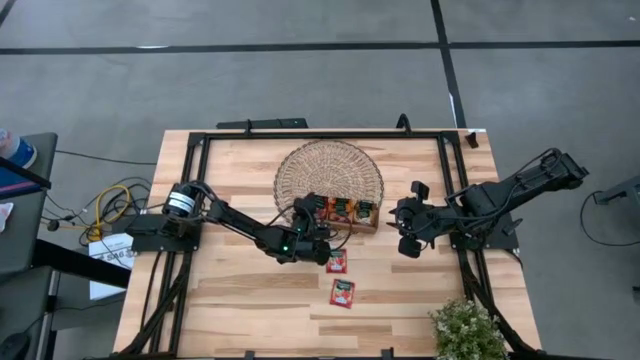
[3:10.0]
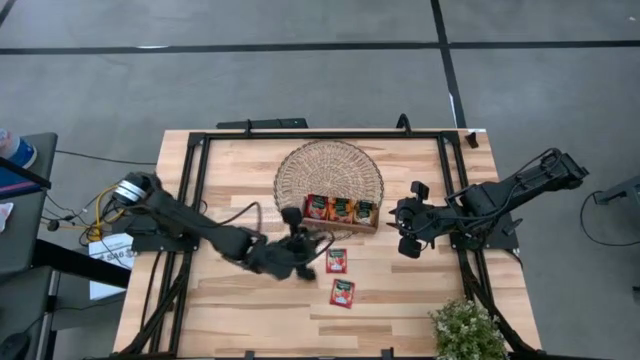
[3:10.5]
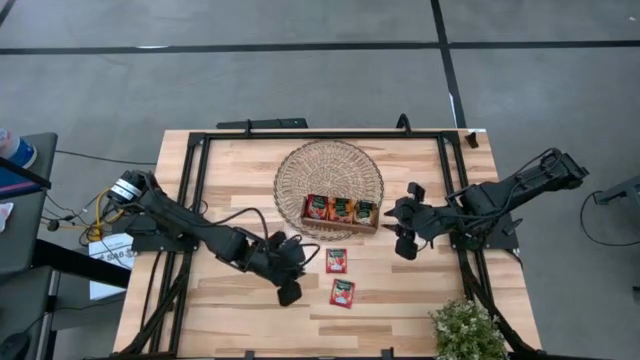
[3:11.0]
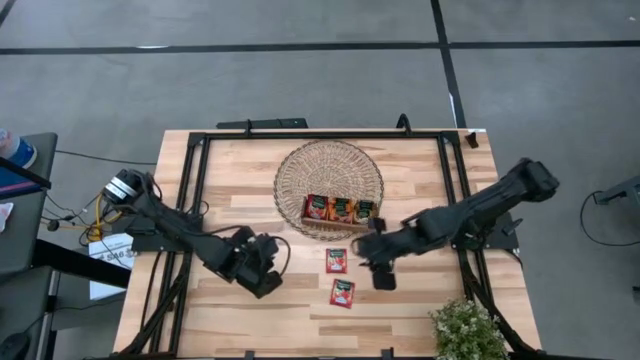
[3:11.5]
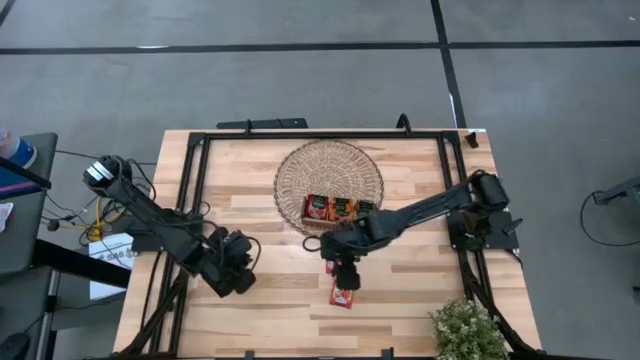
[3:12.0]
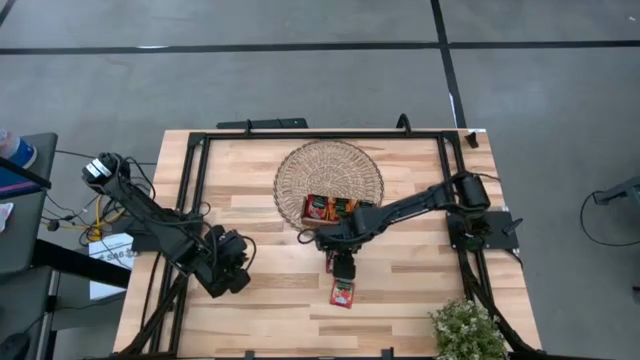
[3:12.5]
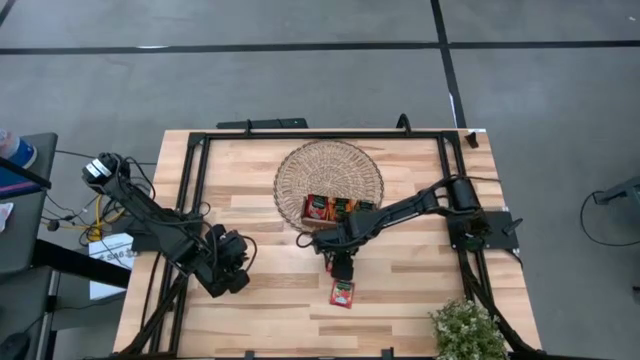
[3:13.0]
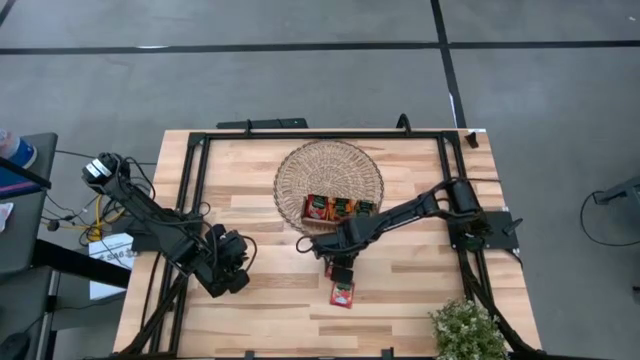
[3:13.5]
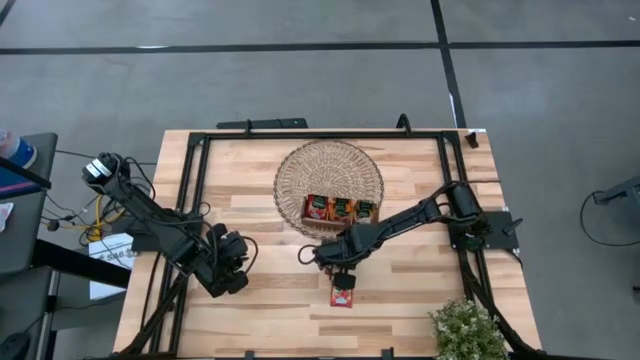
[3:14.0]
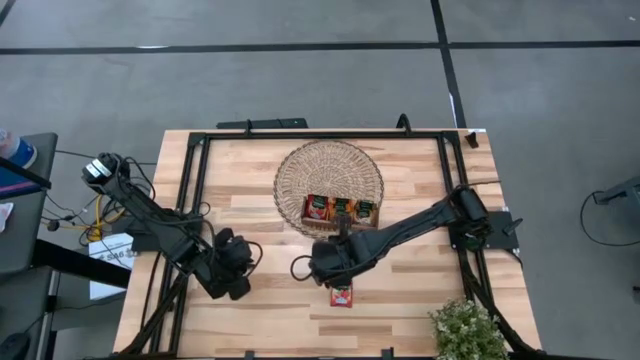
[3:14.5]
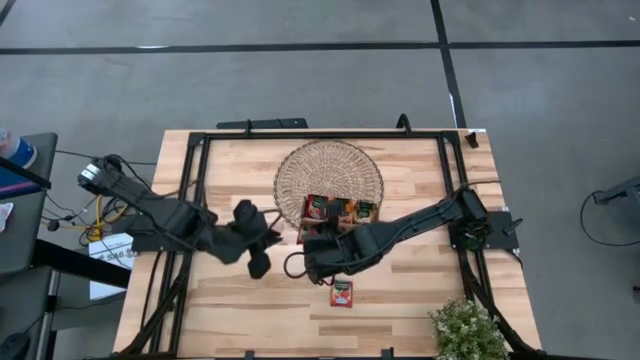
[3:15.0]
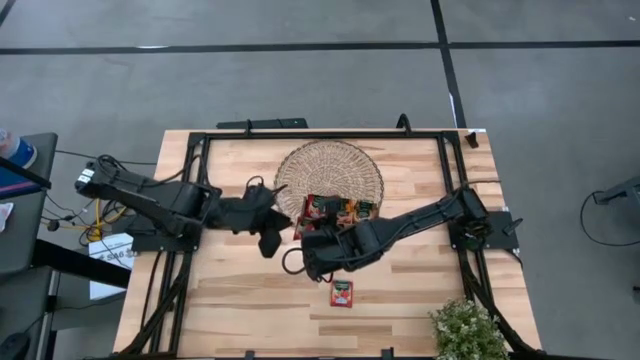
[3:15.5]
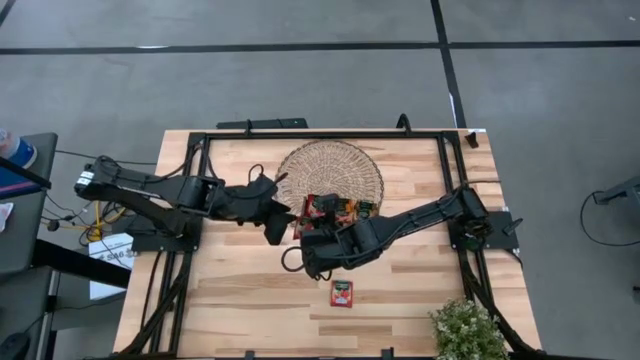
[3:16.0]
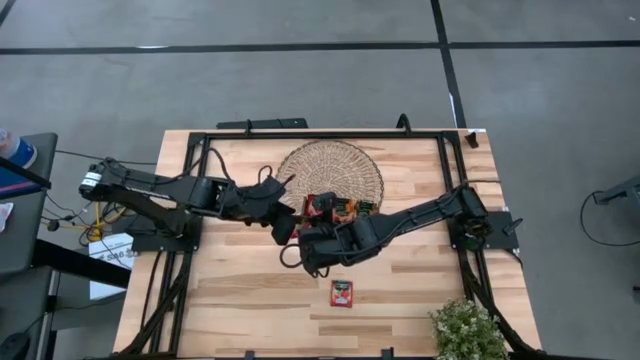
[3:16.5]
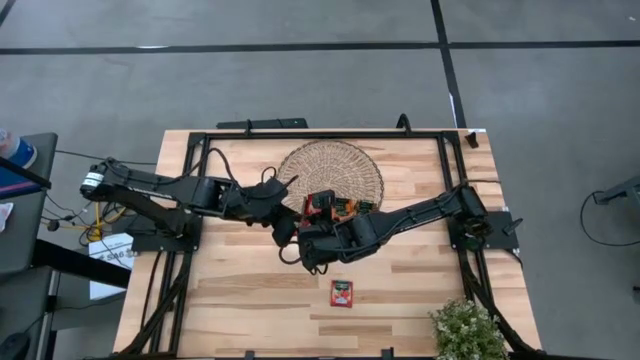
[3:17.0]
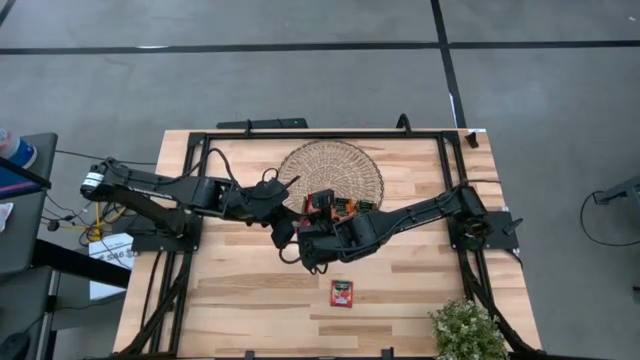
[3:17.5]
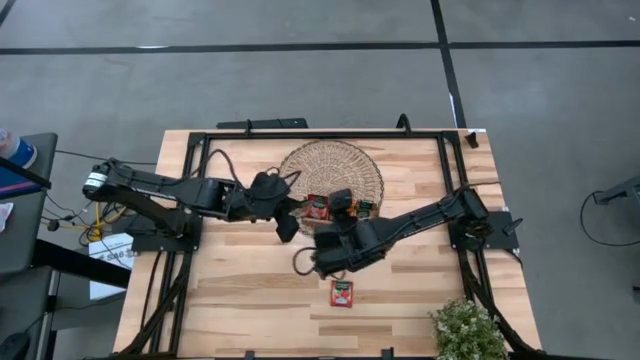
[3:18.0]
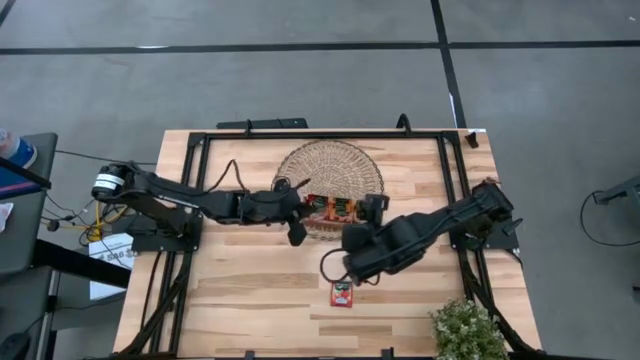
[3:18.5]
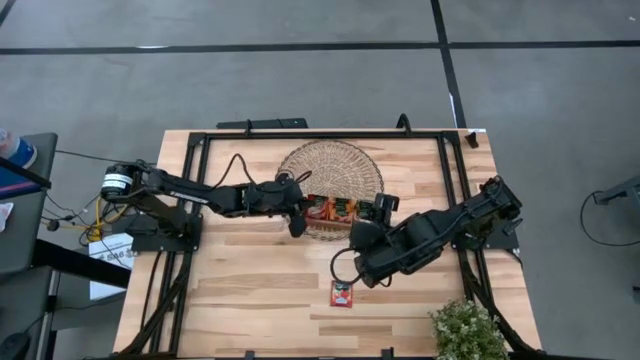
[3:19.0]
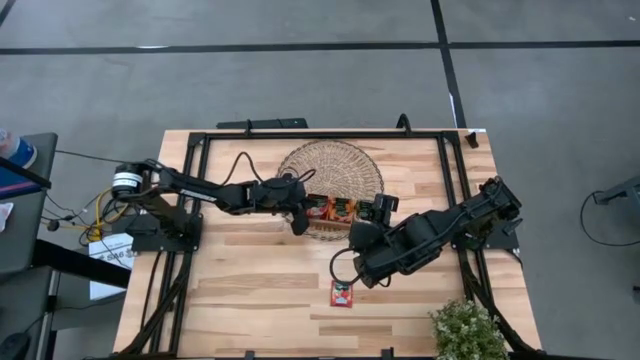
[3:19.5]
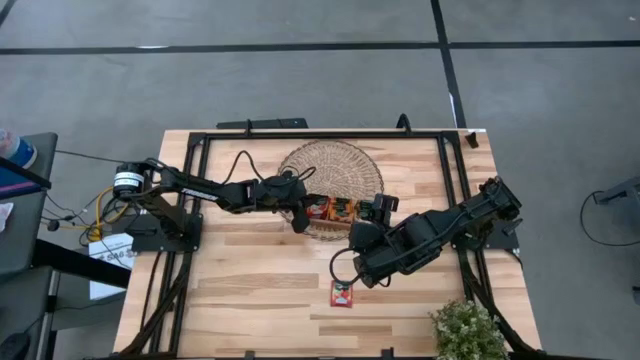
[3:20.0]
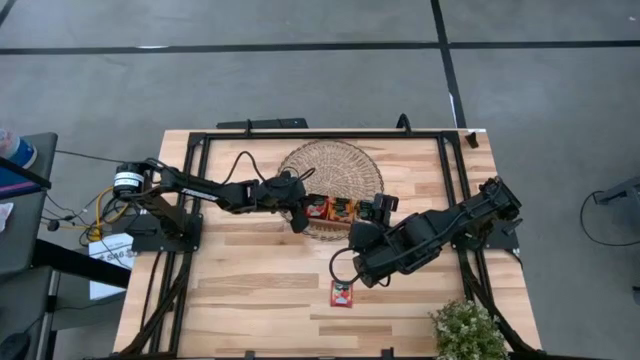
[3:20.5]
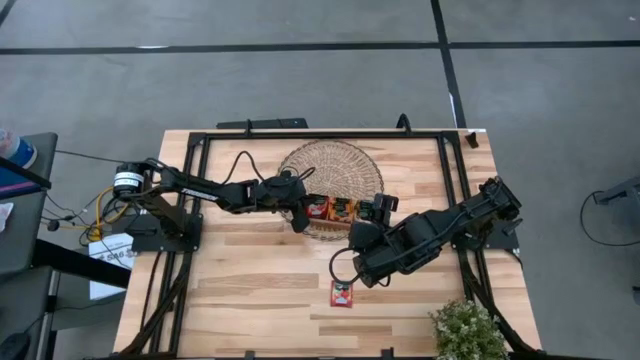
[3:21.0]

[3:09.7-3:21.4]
Task: Pick & Place Tea
Put the red tea bag into the left section of the wooden organizer

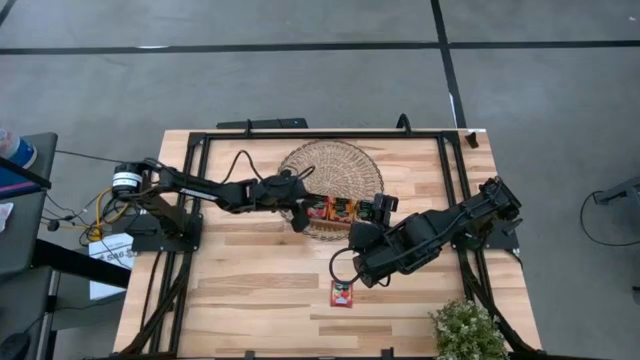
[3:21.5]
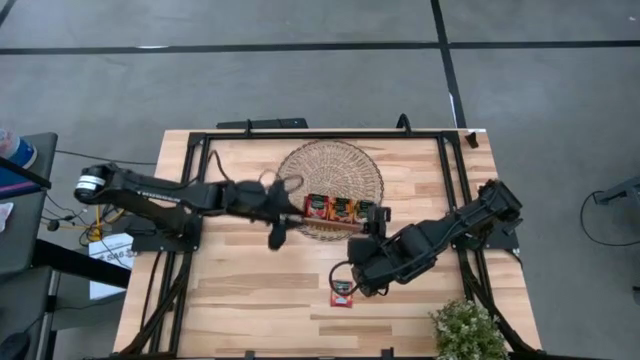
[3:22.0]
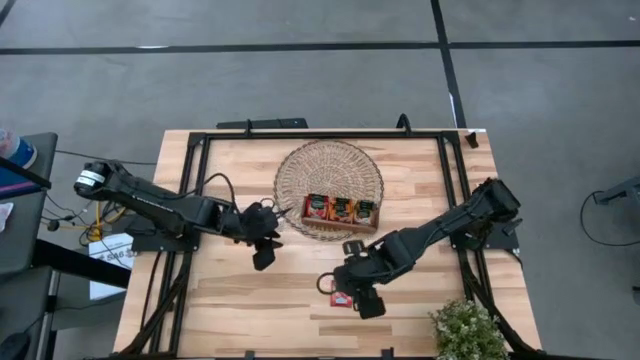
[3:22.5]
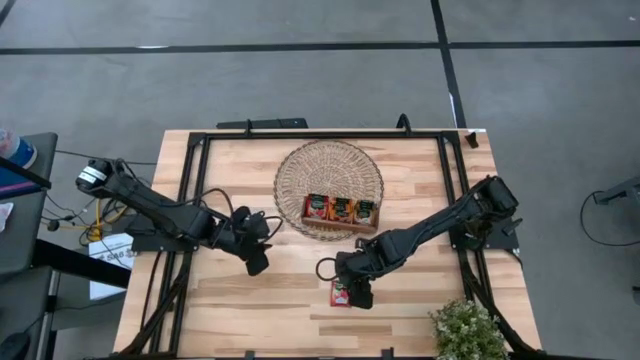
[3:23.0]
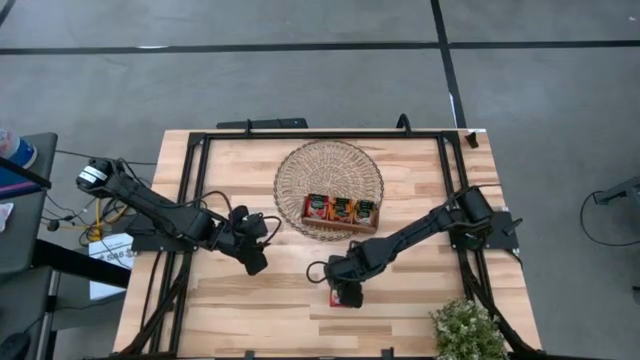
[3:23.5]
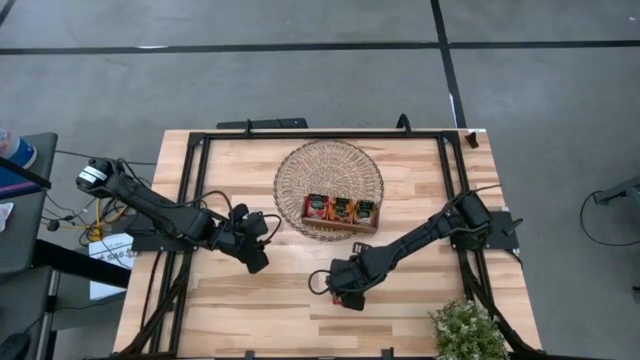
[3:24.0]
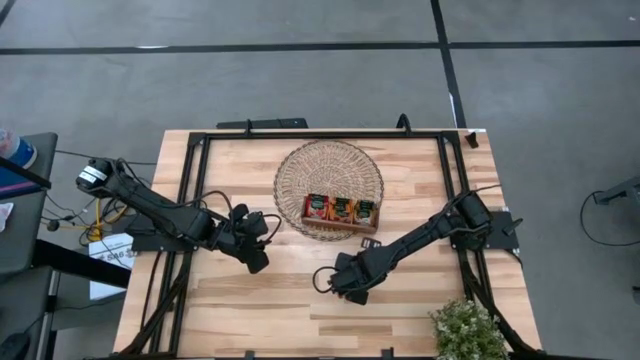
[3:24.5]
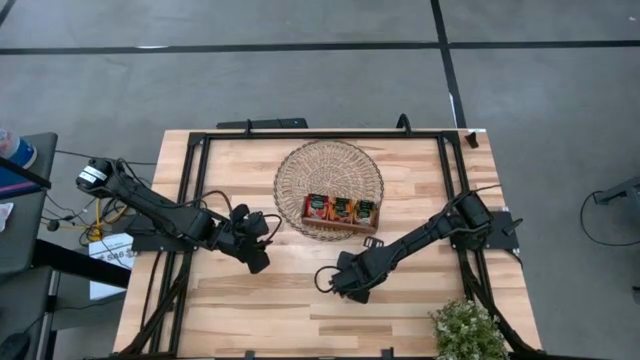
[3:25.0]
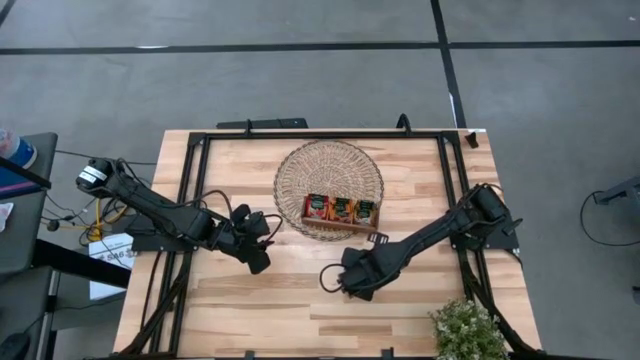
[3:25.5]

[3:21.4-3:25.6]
Put the red tea bag into the left section of the wooden organizer

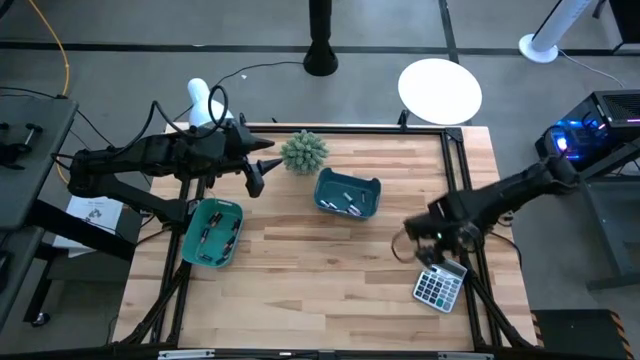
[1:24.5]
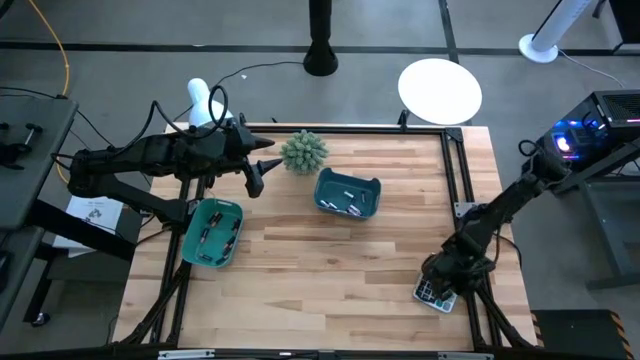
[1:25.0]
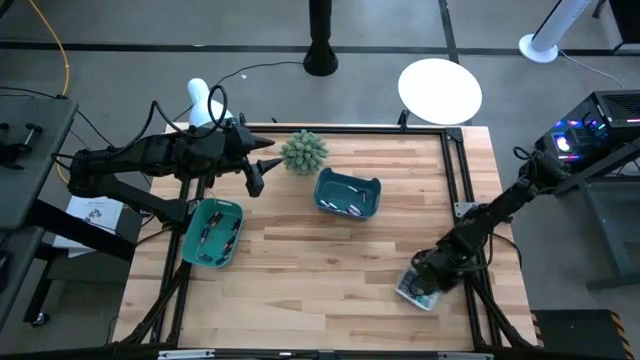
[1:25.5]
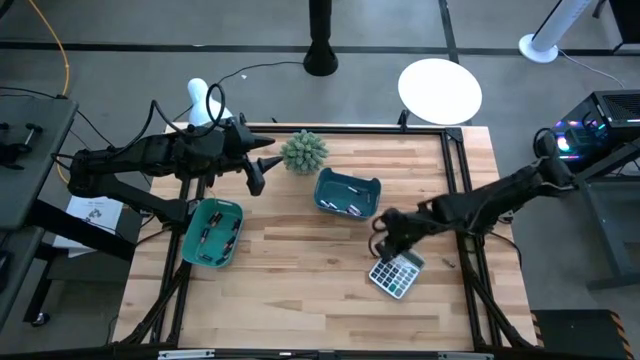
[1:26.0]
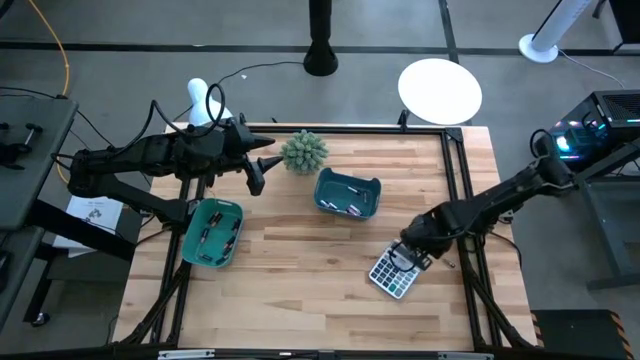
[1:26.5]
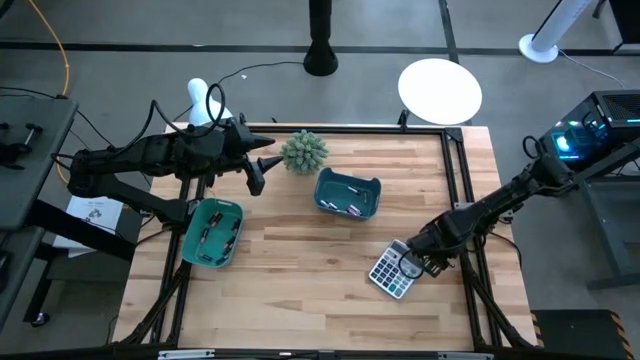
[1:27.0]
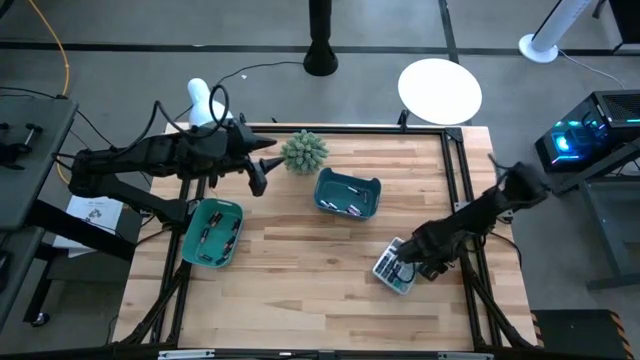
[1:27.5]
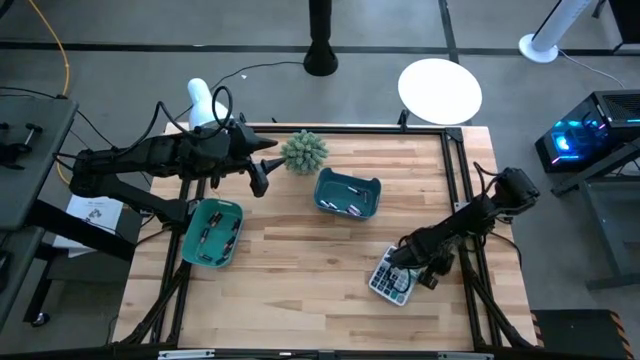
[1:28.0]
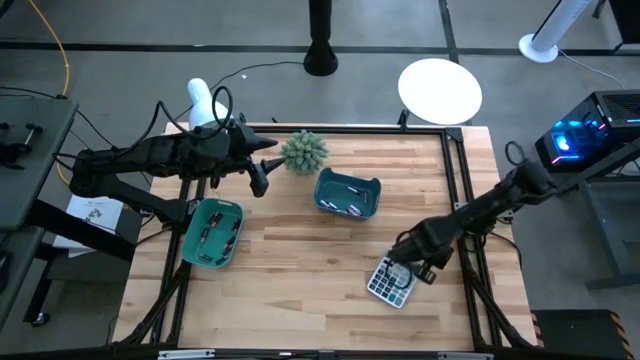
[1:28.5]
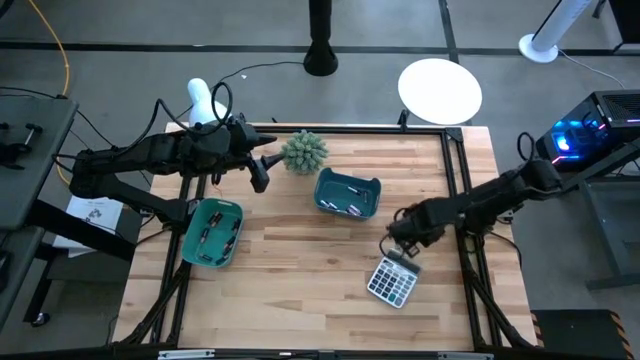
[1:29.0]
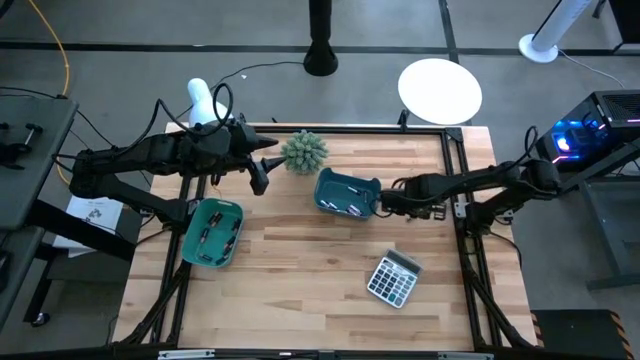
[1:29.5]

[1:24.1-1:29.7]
Task: Sort batteries
Put the silver battery into the blue bin

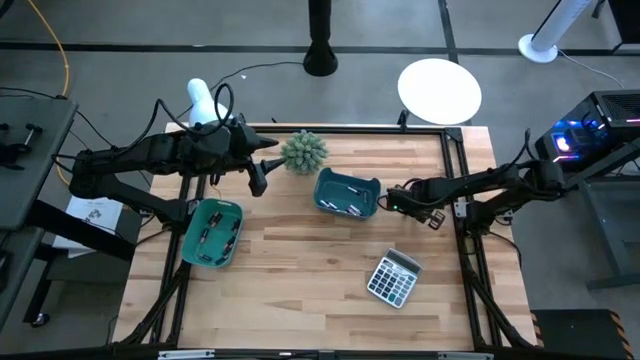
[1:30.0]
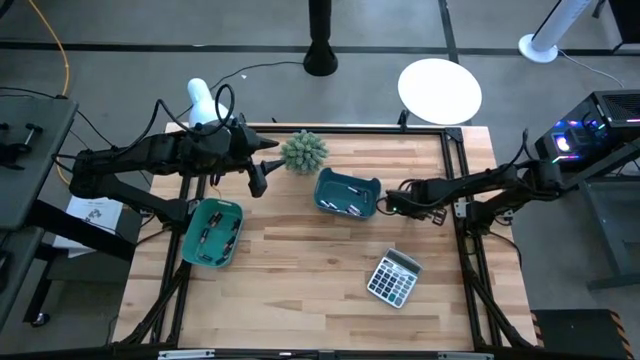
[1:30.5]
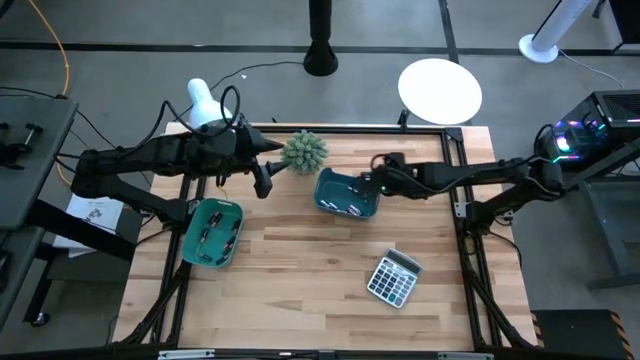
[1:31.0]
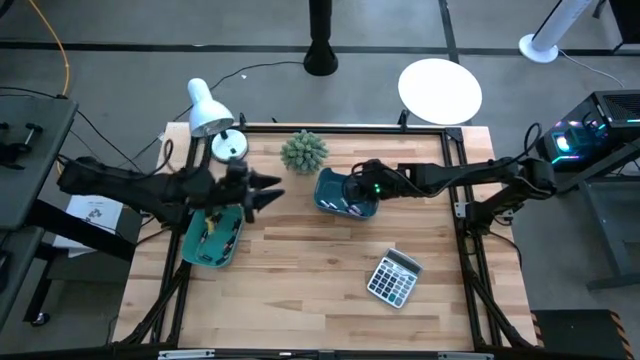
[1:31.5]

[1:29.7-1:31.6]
Put the silver battery into the blue bin
